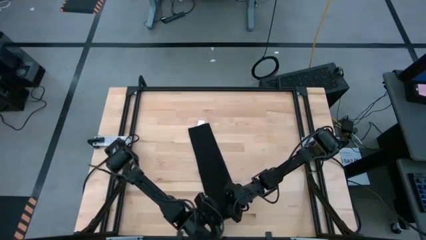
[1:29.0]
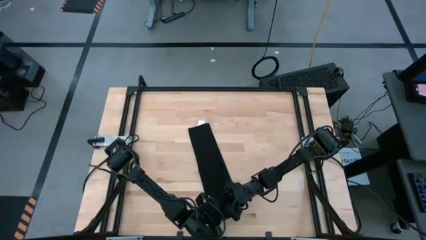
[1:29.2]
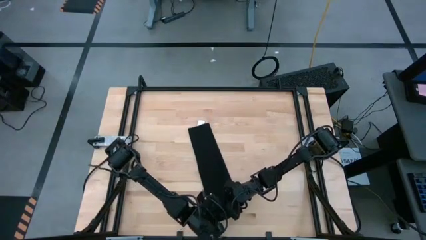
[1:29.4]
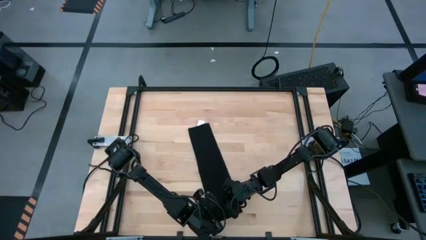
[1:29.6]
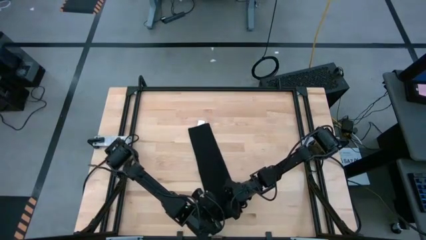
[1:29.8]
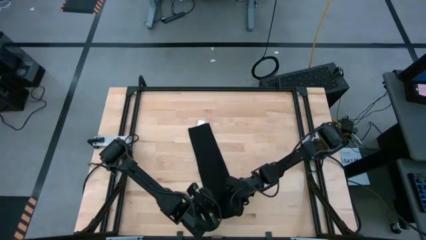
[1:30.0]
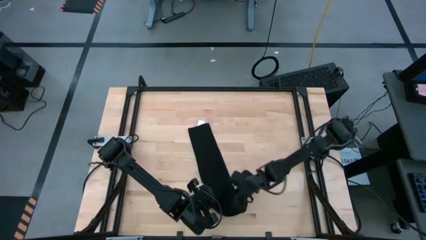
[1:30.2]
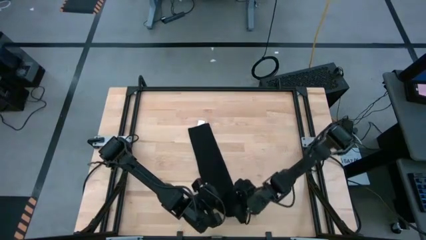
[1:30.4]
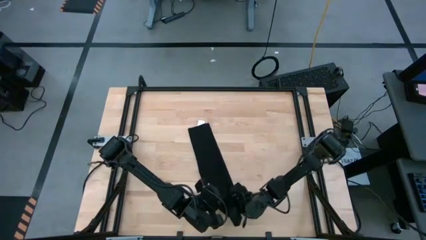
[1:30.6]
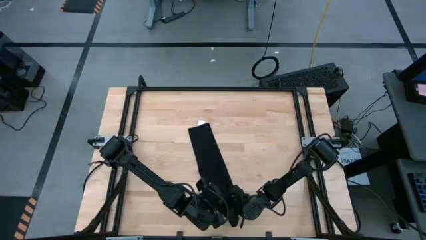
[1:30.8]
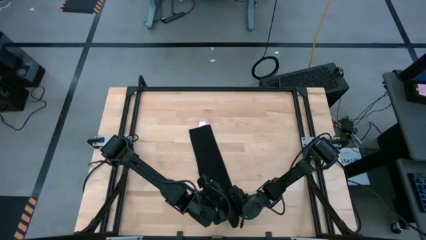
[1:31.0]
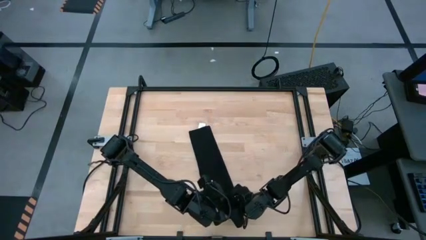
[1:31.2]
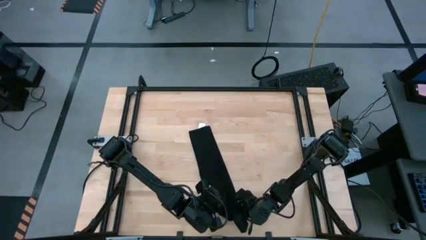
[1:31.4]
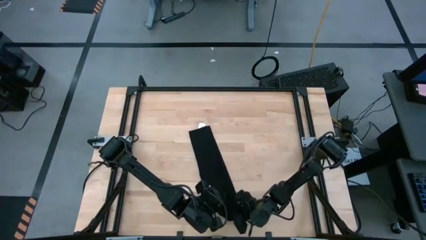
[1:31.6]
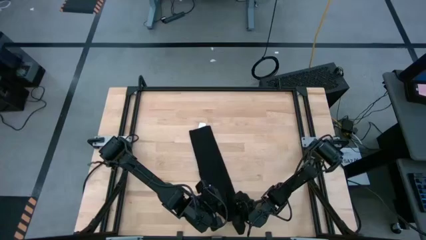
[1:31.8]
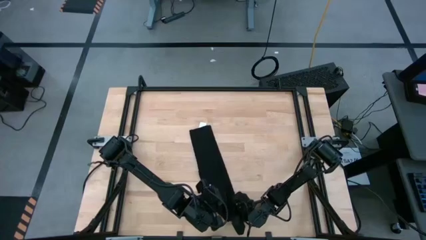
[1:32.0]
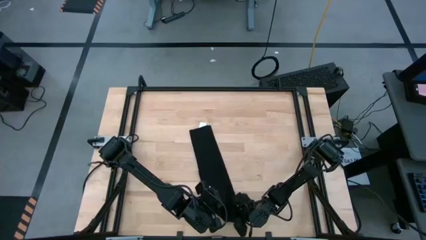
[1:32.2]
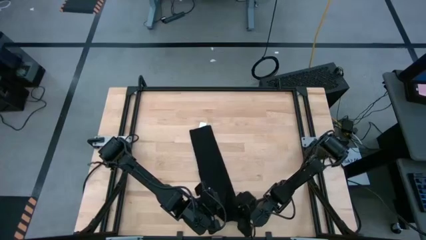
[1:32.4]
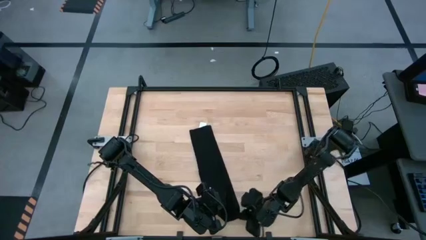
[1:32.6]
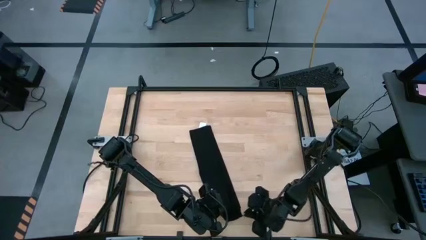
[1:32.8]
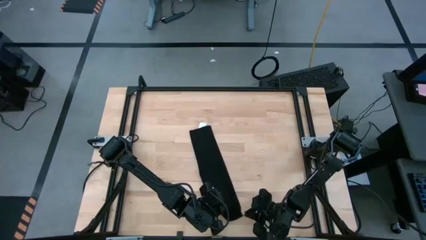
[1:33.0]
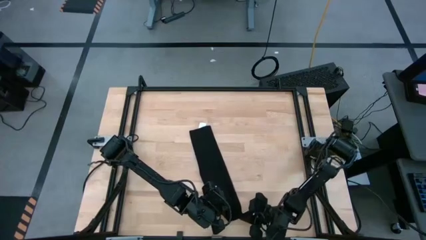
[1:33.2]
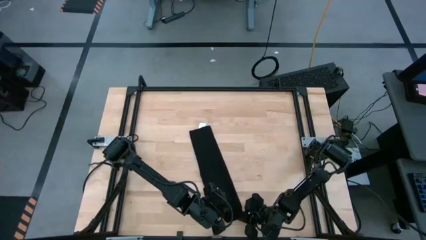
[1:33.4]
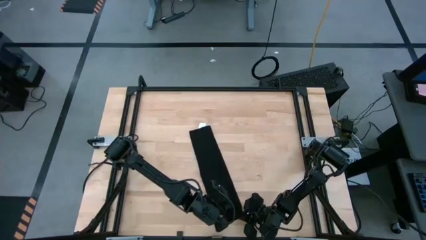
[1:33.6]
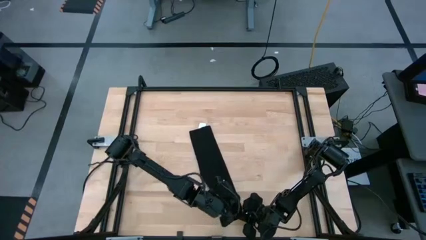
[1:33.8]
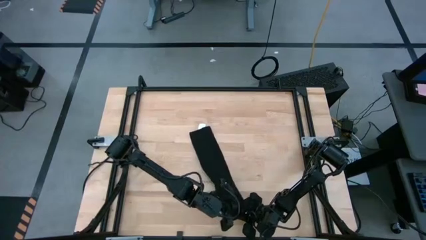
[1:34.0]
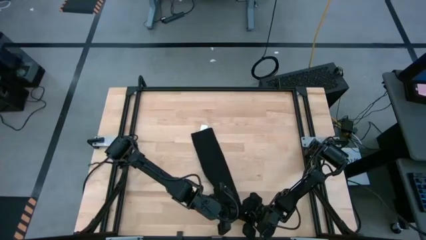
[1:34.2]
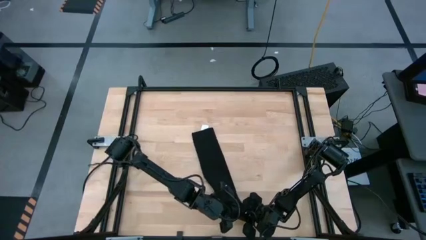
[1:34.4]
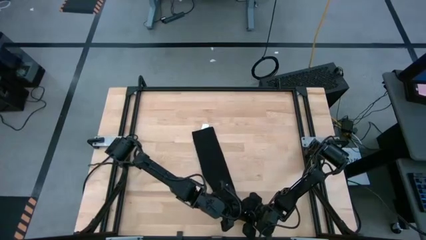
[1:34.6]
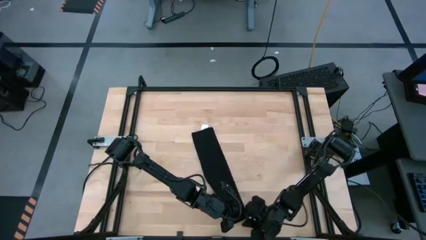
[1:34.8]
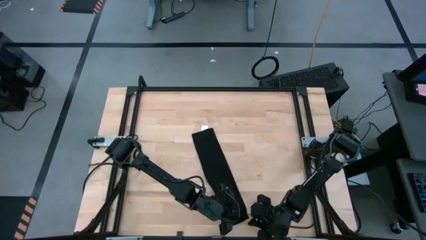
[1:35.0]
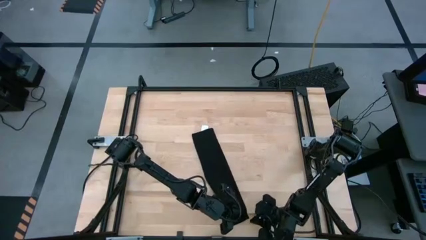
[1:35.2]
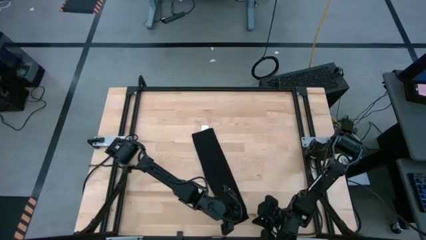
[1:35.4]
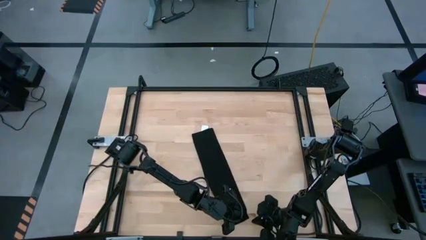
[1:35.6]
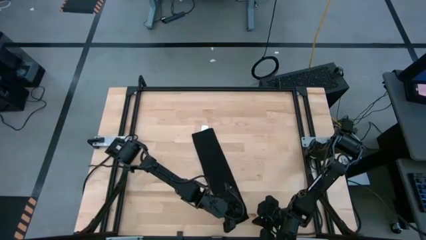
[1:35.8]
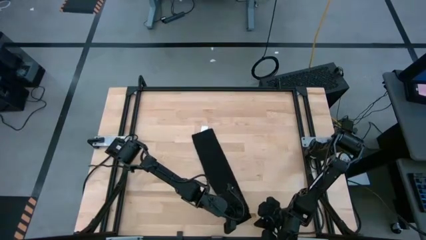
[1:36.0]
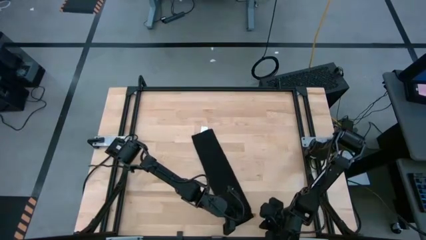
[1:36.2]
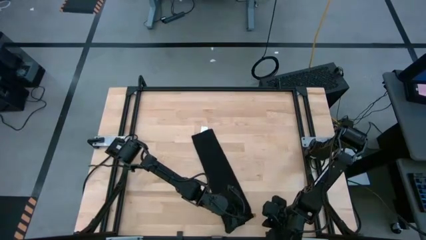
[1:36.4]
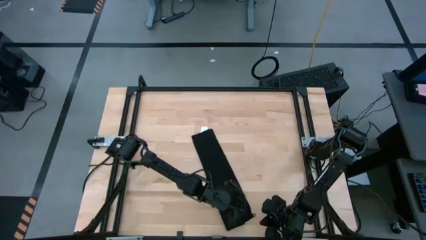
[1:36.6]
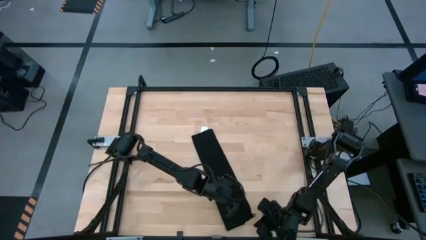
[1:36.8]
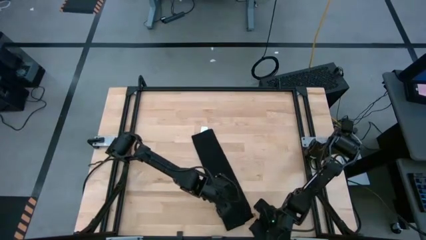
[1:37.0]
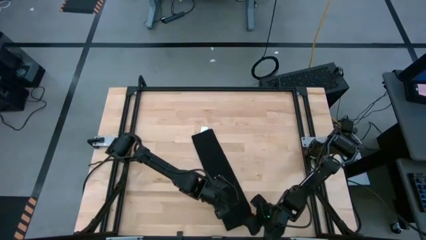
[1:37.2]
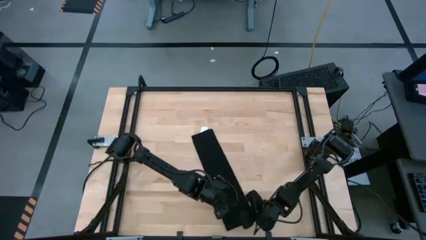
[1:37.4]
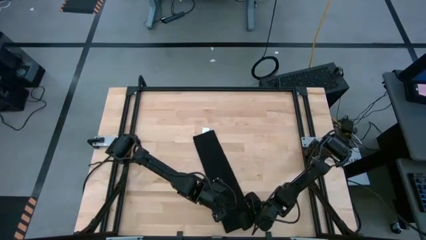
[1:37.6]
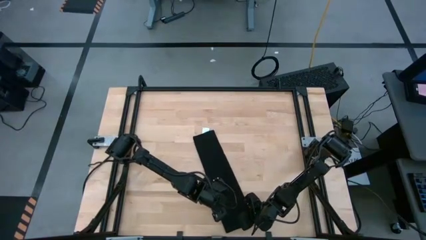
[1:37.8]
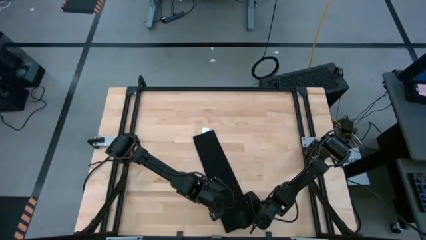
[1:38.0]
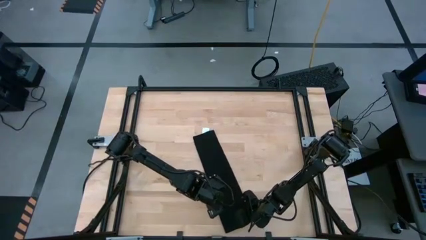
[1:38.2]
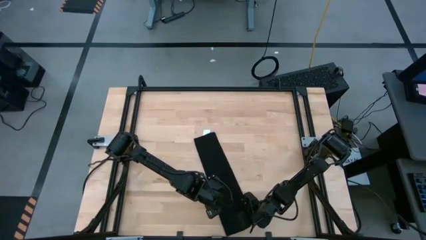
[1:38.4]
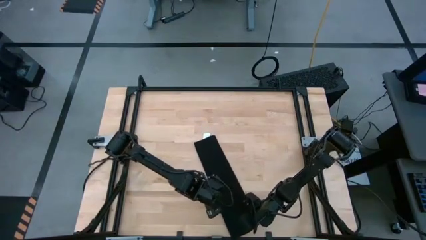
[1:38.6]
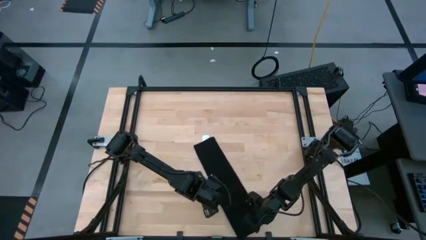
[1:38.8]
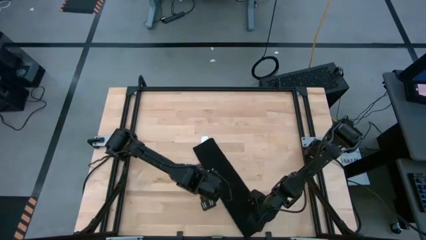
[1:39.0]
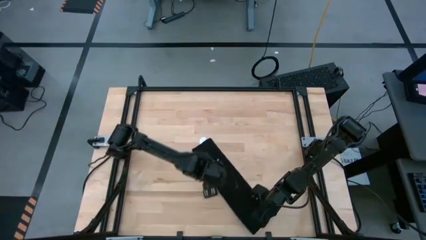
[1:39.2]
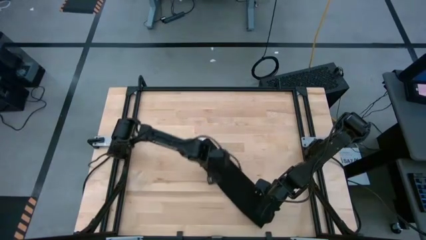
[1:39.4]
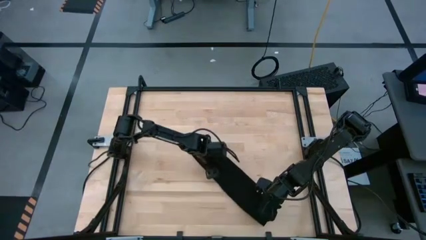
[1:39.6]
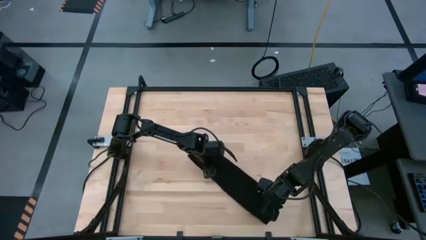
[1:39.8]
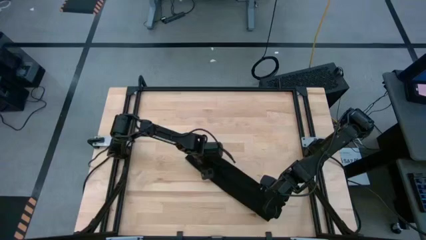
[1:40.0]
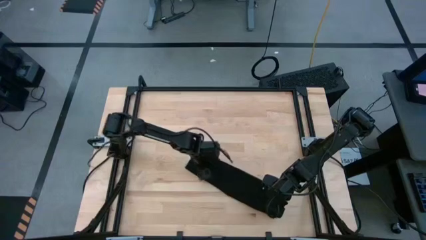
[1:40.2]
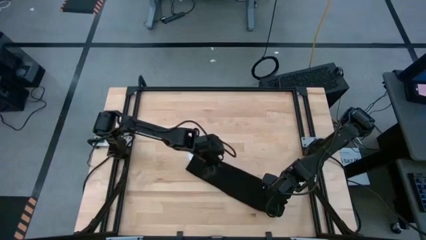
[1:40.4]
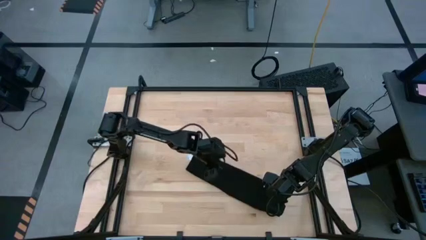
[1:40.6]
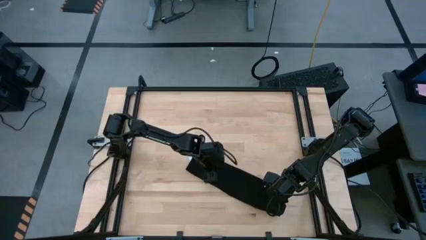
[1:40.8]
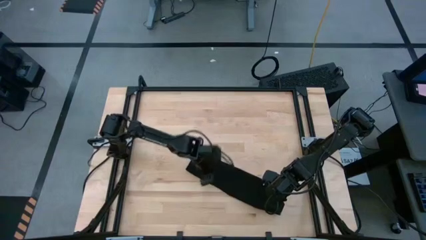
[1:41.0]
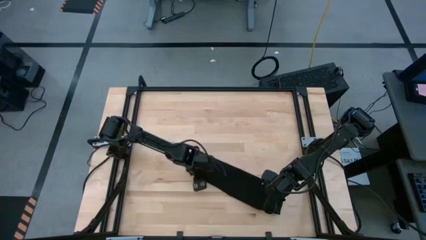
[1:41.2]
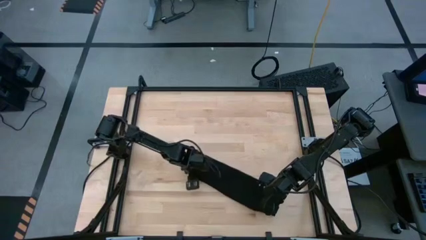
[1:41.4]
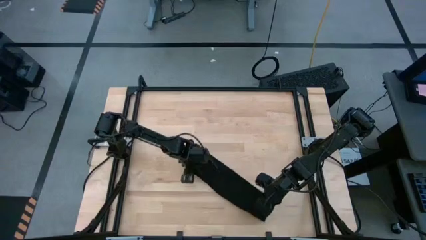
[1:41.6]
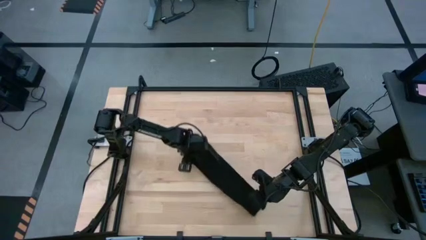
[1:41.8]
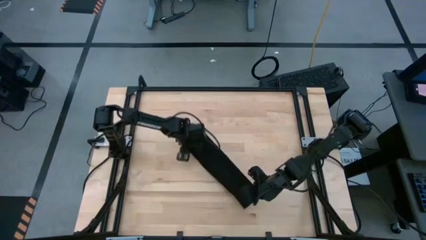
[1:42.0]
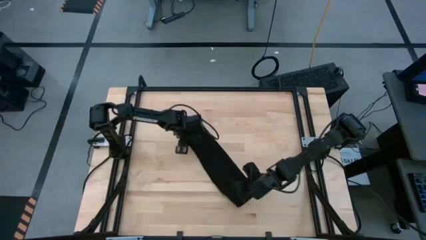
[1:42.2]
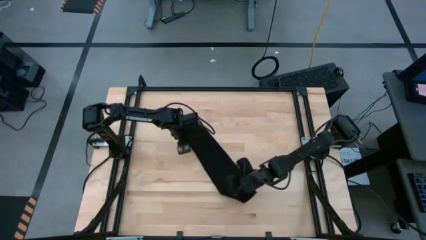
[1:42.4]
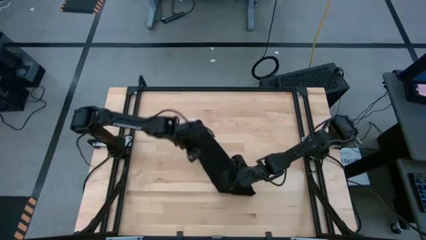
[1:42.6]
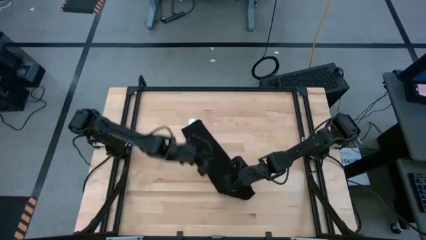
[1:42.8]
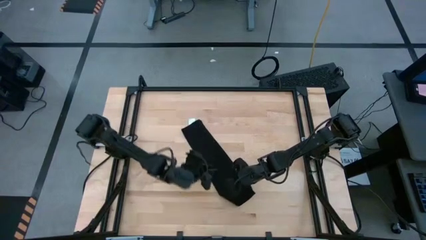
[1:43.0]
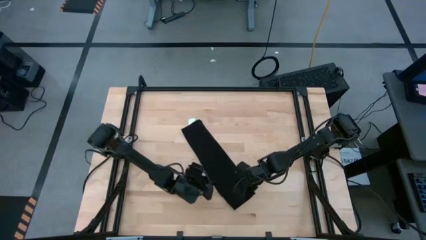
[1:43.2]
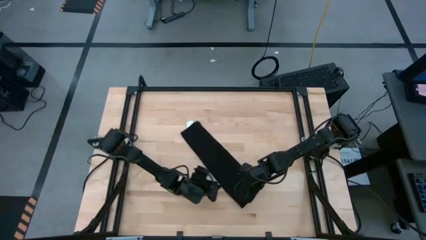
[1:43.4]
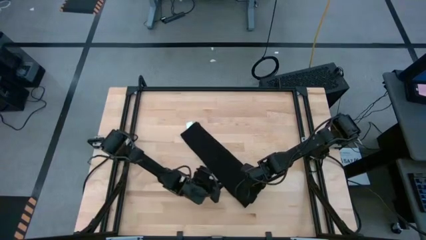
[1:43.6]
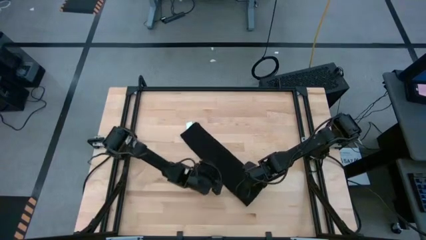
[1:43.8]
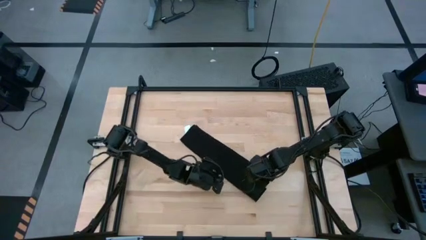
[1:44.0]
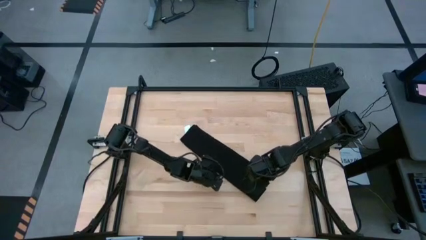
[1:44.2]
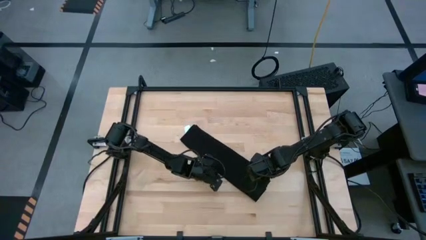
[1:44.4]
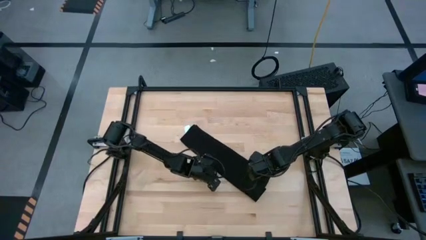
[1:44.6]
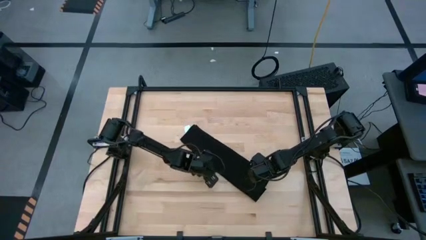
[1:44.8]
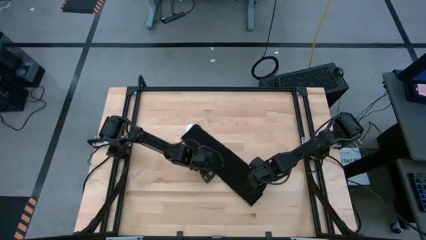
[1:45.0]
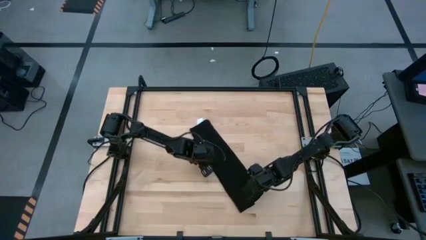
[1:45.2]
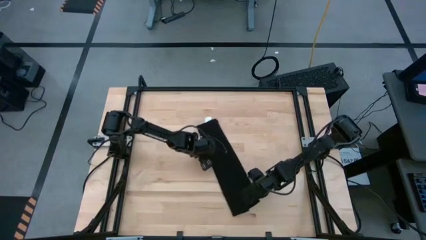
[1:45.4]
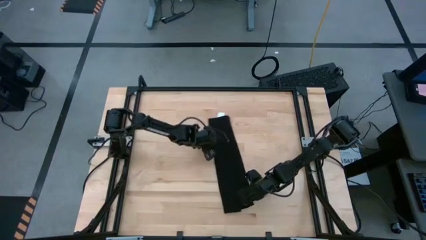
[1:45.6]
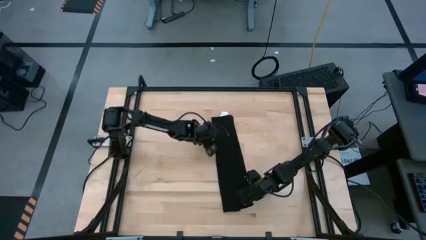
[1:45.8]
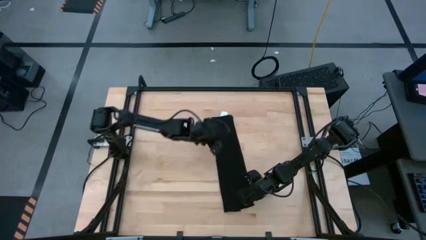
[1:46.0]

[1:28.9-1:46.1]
Task: Roll napkin
Fold the black napkin
